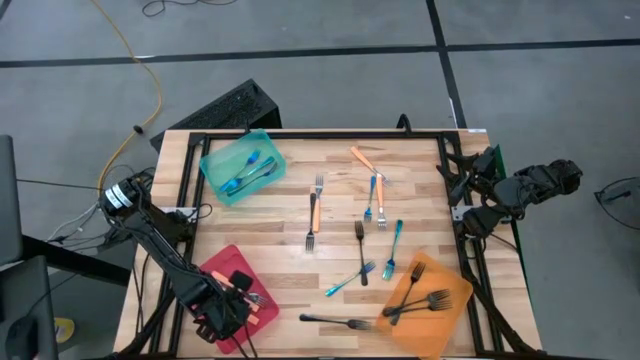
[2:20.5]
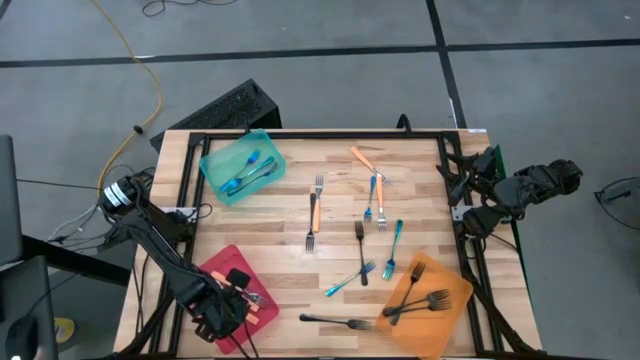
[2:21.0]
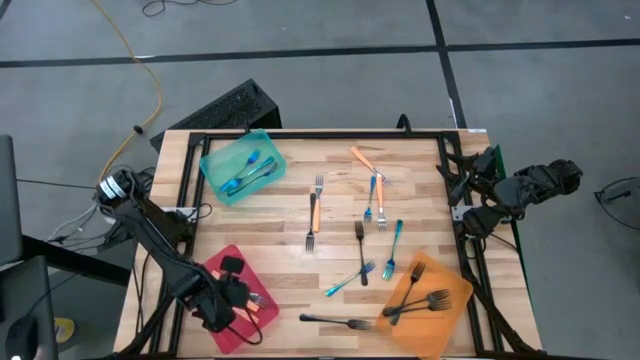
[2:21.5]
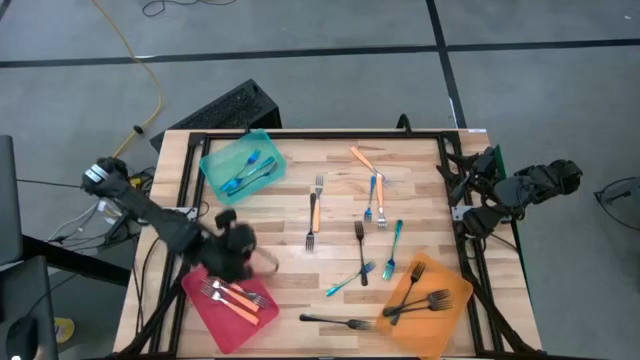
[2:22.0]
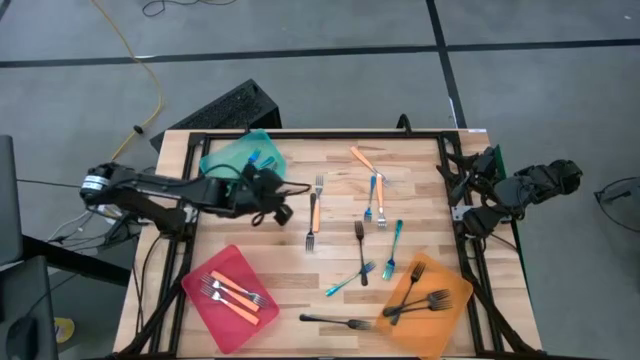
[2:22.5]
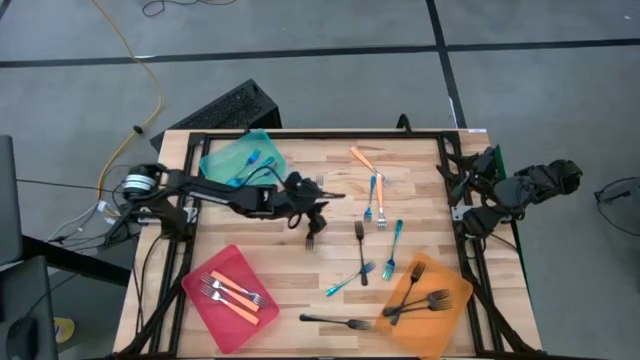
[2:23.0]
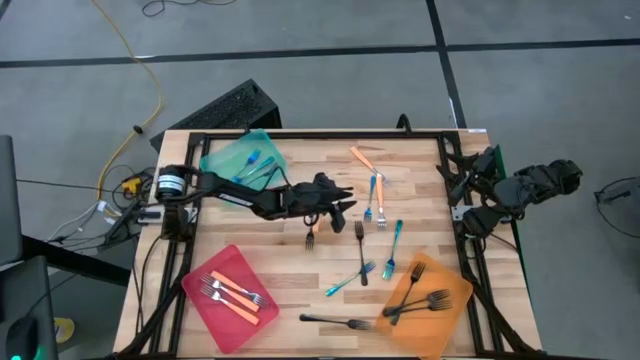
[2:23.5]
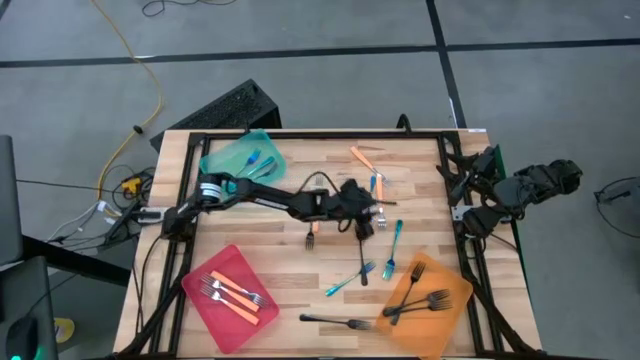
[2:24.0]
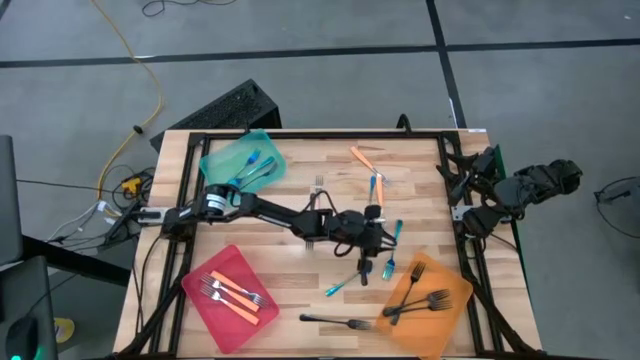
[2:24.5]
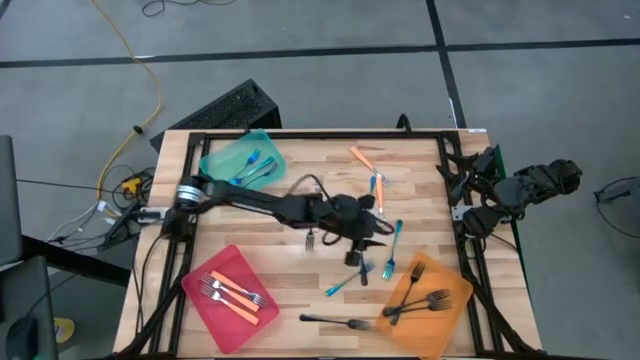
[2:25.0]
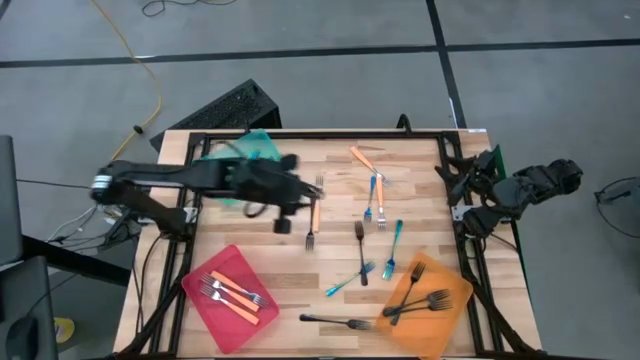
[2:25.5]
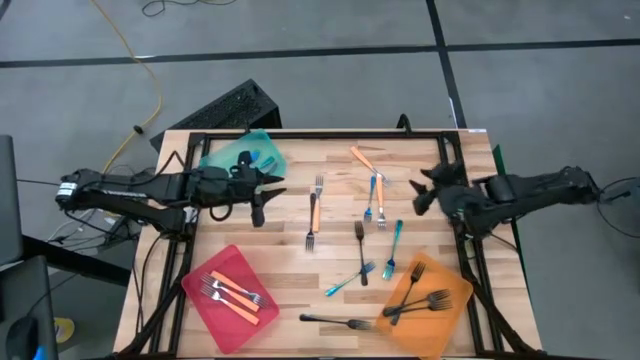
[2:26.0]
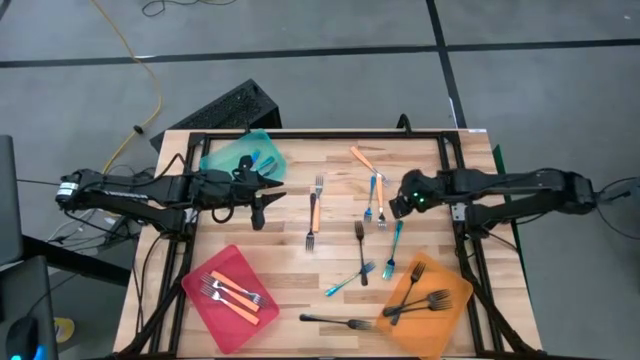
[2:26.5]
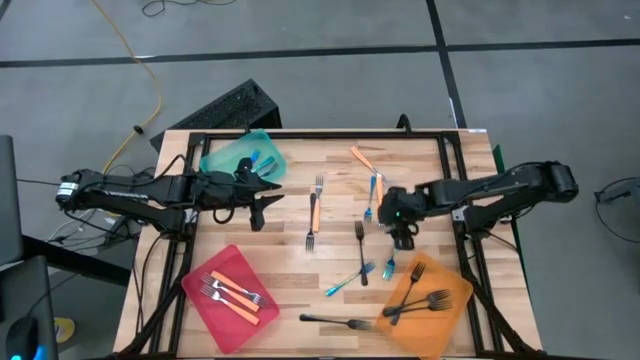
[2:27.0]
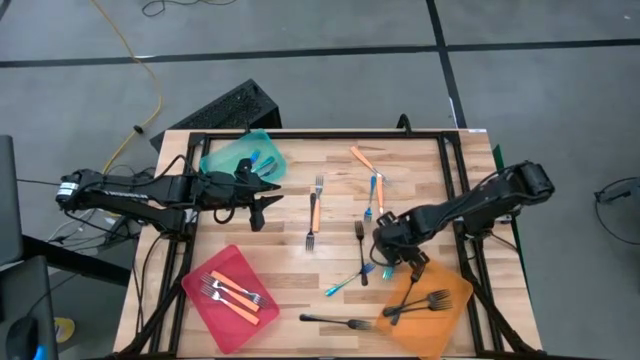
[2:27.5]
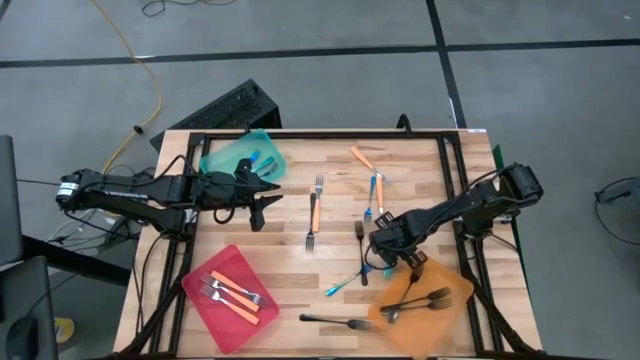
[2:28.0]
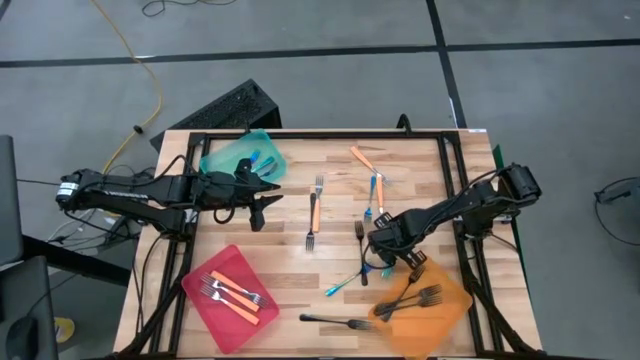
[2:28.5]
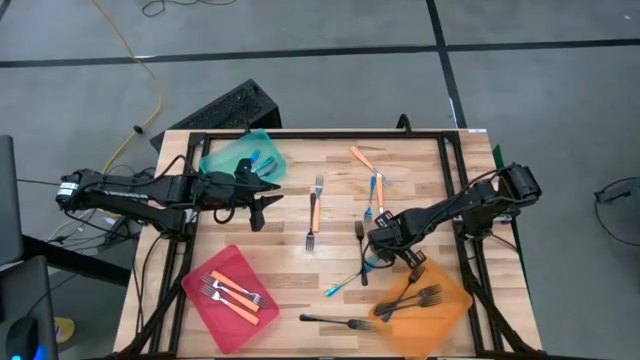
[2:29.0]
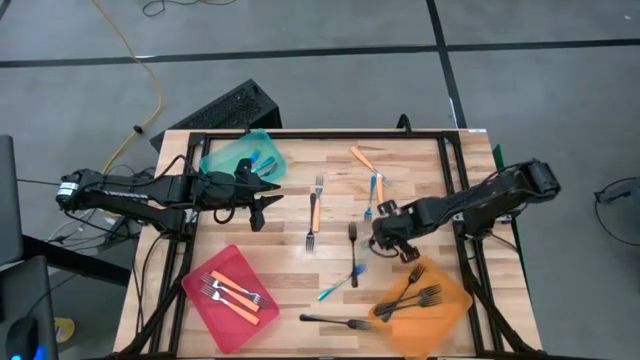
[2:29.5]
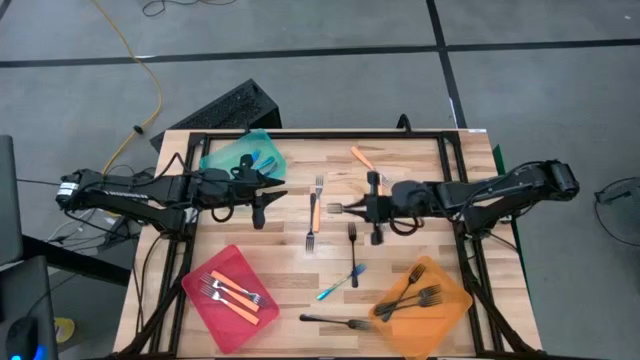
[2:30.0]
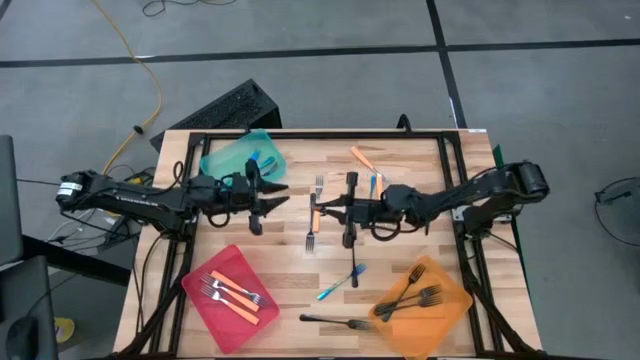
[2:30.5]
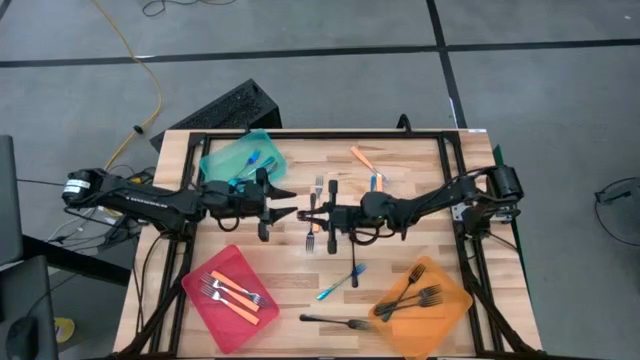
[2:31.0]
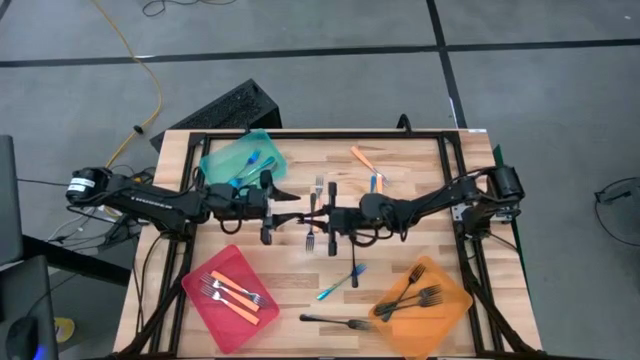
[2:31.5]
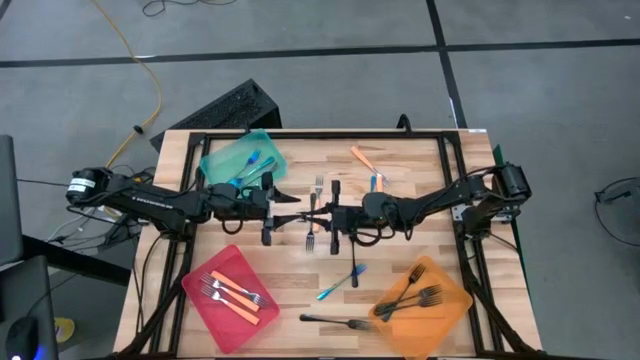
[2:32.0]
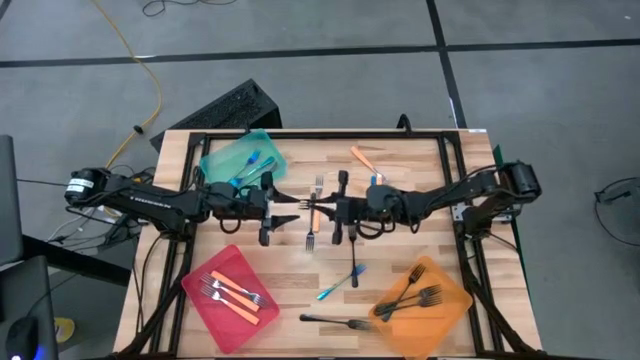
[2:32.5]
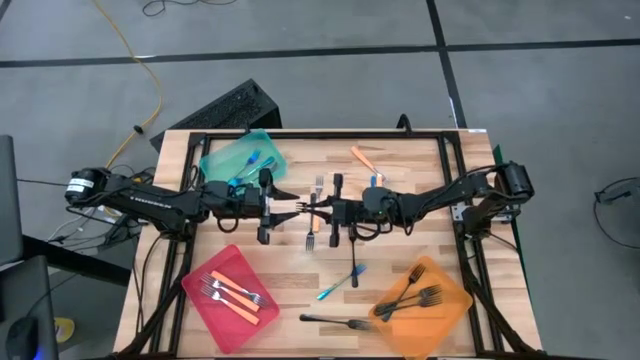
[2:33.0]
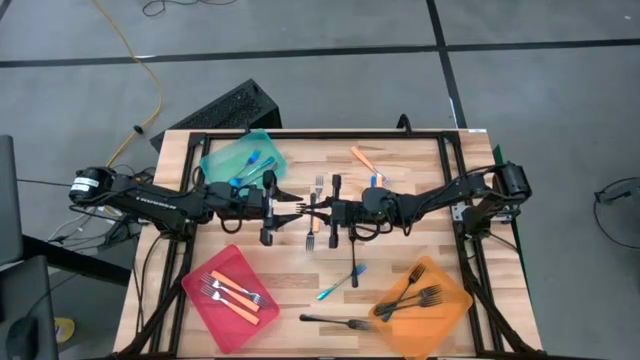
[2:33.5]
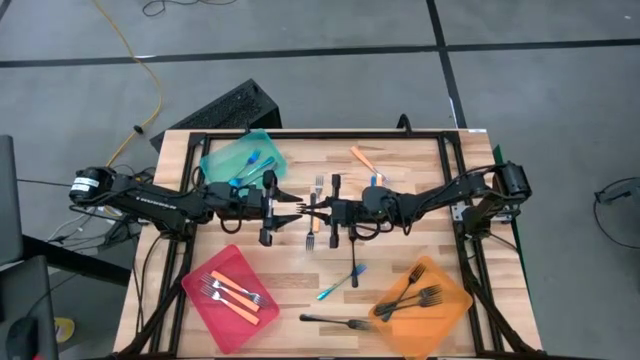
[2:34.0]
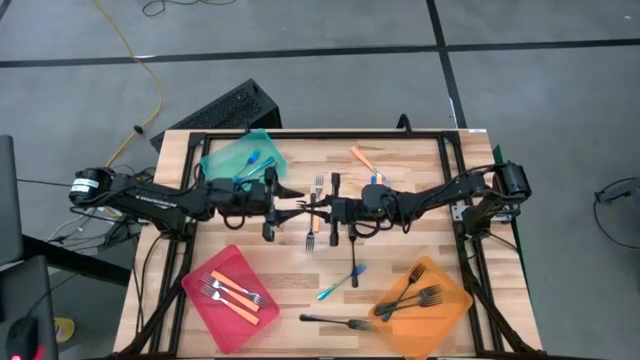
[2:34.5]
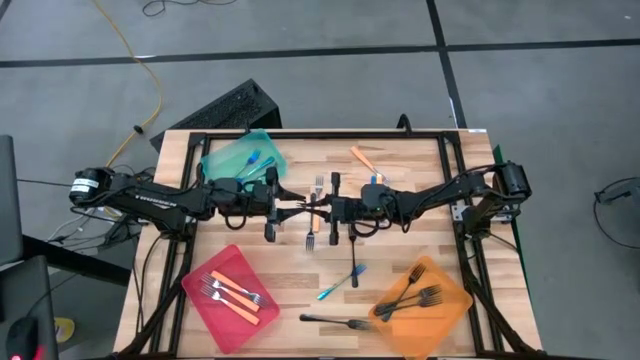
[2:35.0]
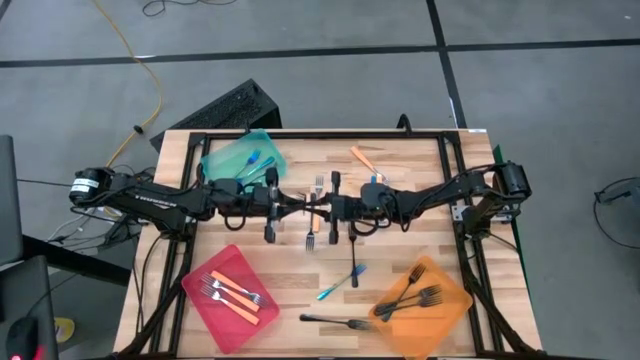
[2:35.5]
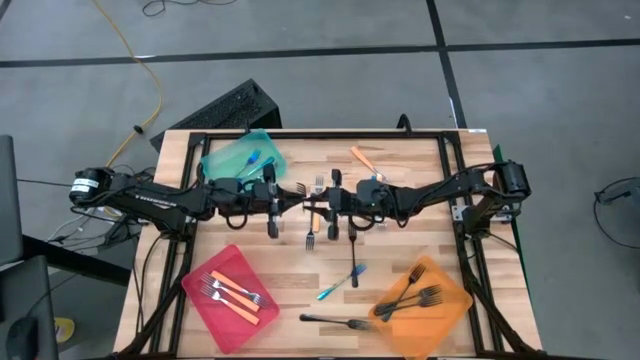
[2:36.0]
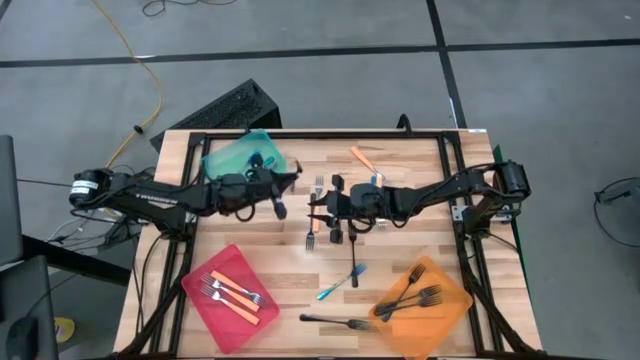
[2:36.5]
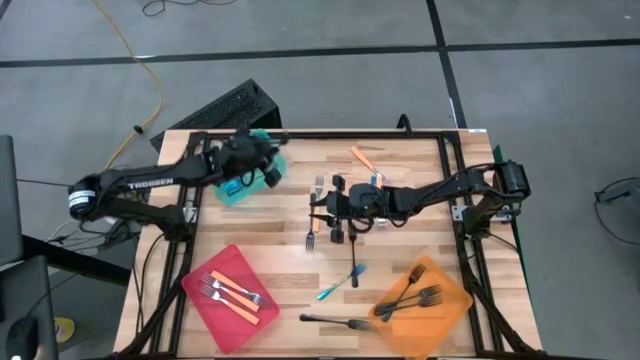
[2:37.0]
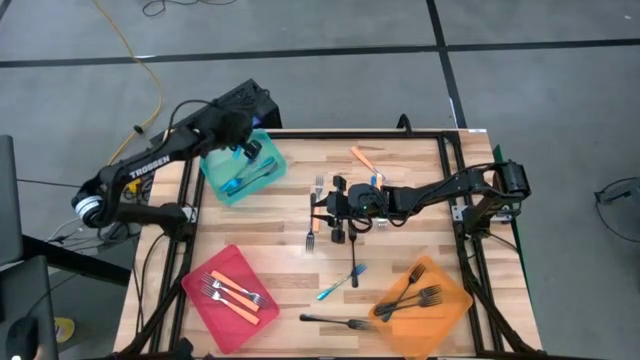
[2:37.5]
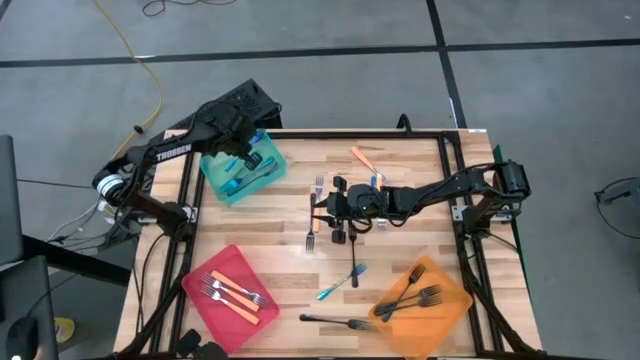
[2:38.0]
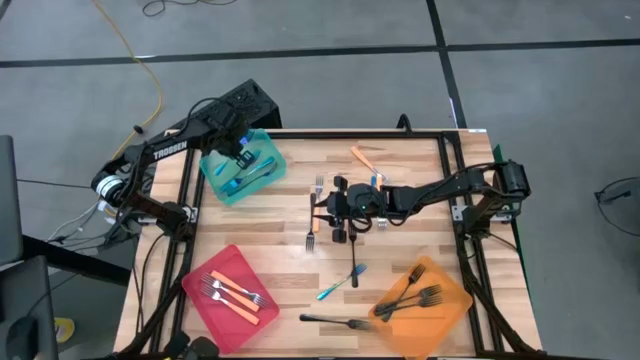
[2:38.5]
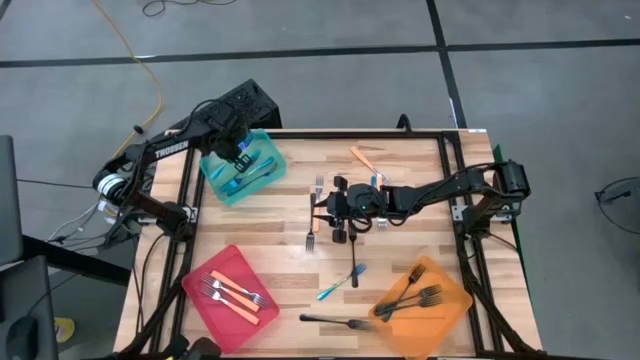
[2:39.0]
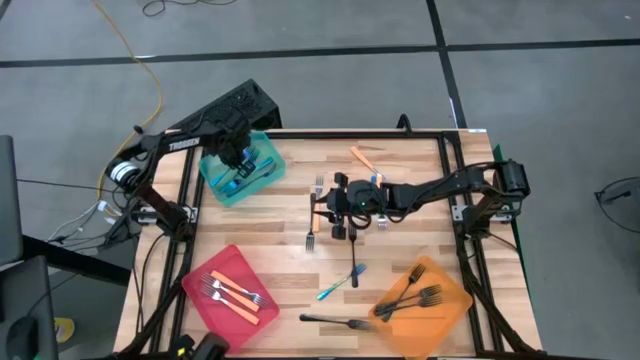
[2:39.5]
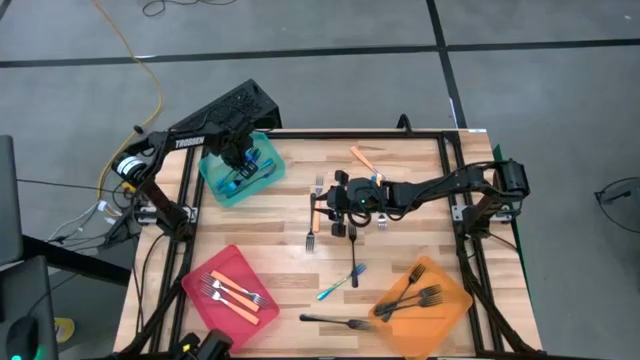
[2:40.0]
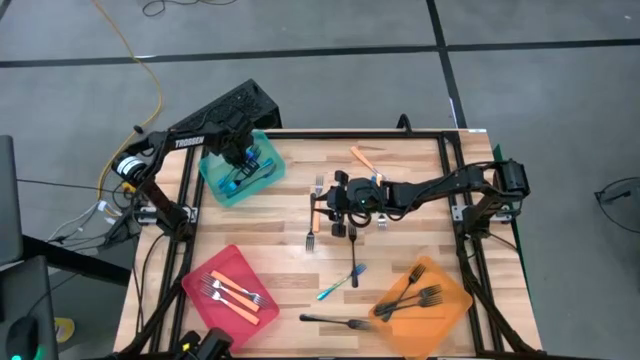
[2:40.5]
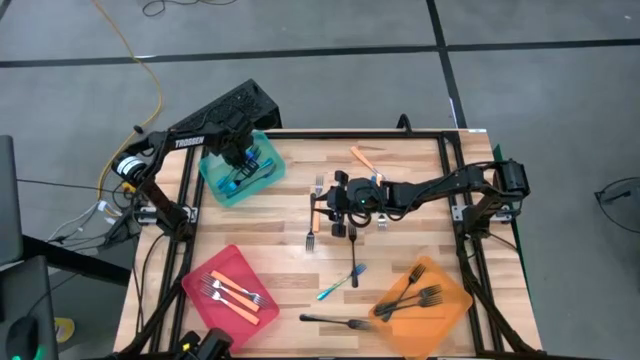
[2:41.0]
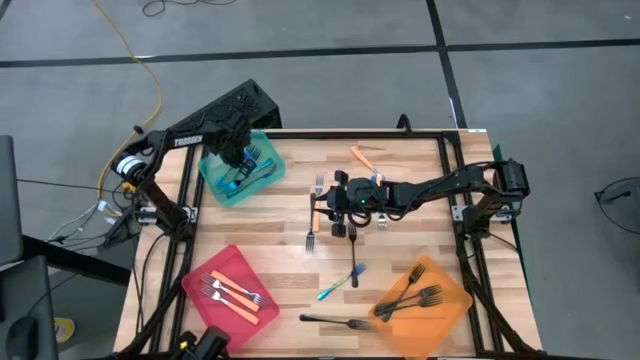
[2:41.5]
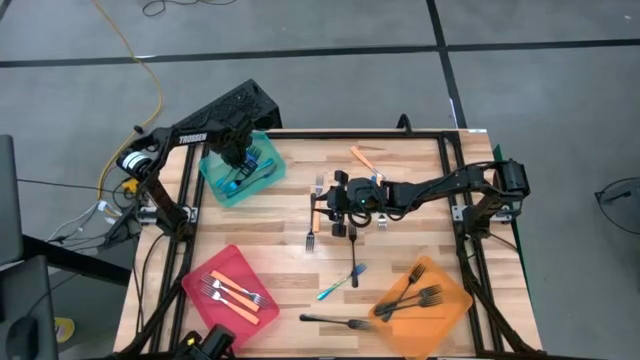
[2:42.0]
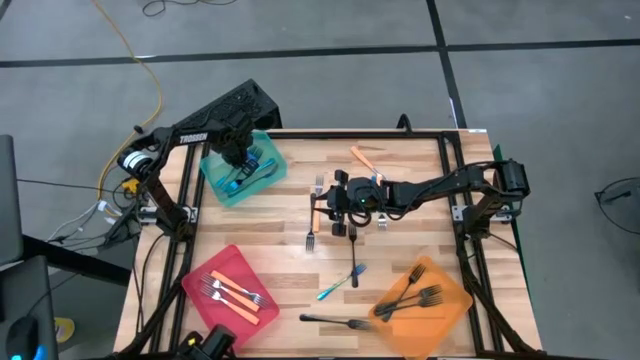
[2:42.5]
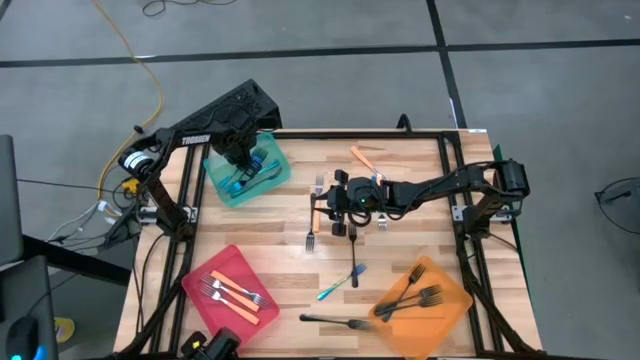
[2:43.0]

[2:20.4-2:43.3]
Task: Sort silverware by color (type)
Put the blue fork into the blue bin
